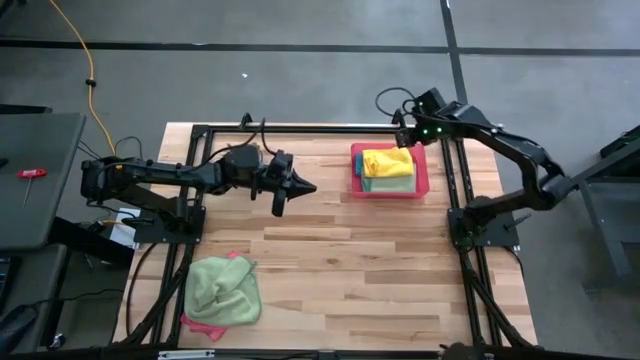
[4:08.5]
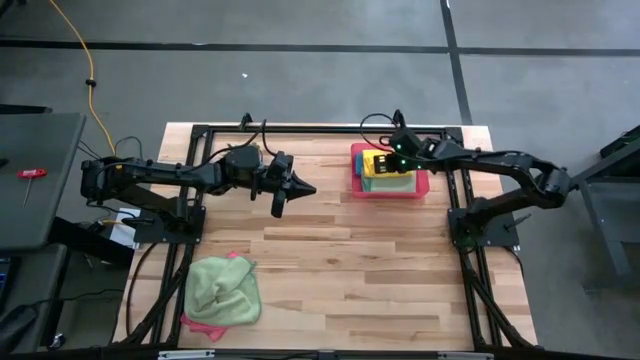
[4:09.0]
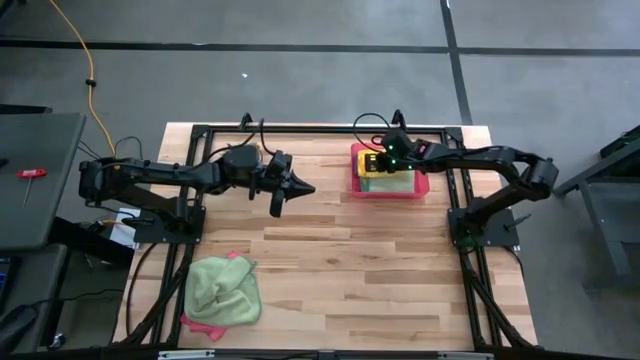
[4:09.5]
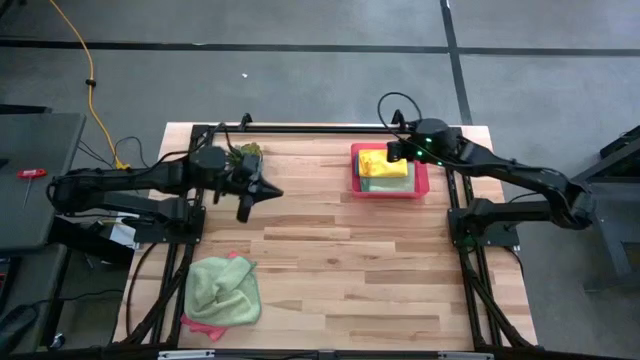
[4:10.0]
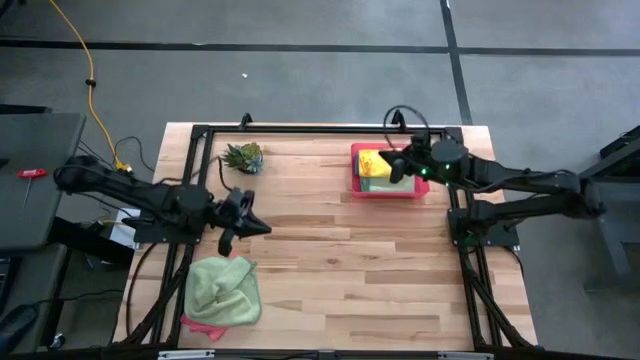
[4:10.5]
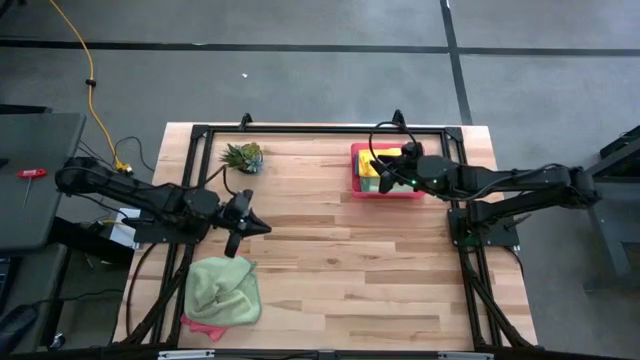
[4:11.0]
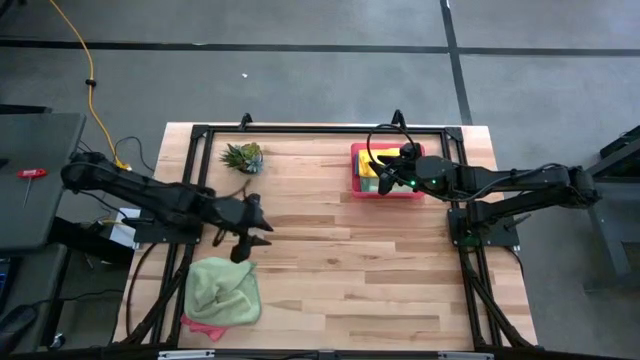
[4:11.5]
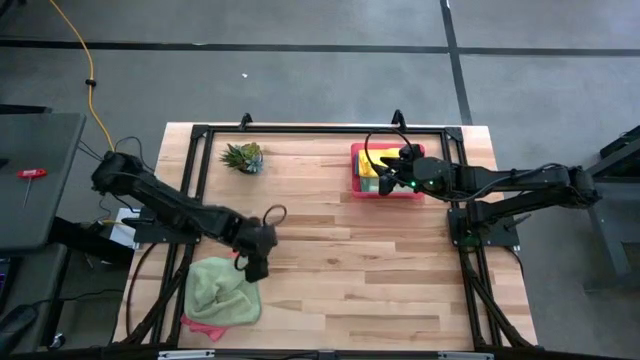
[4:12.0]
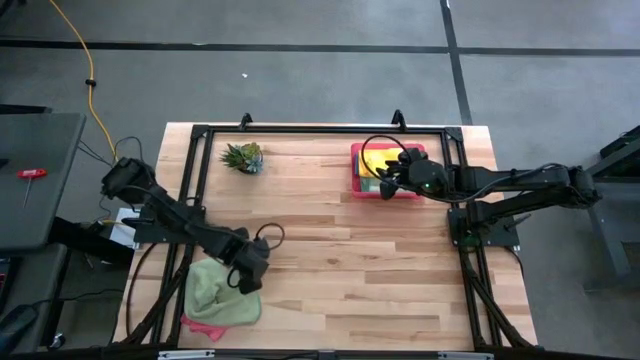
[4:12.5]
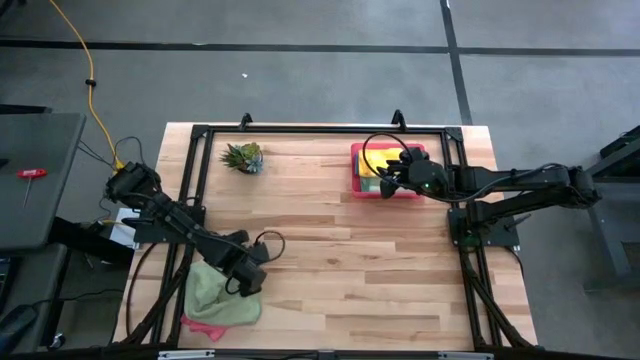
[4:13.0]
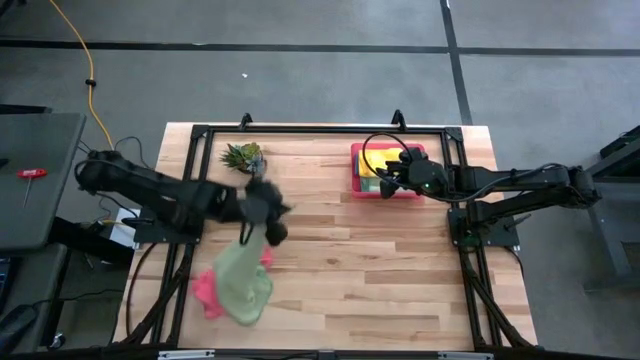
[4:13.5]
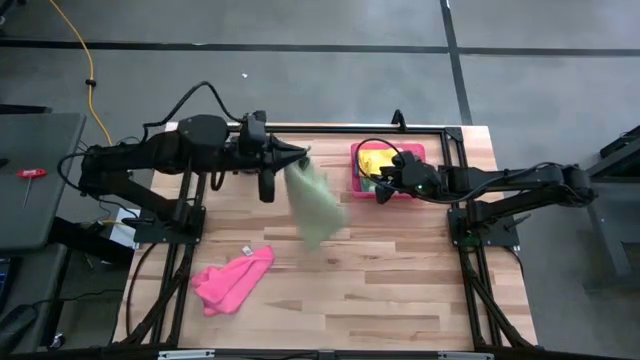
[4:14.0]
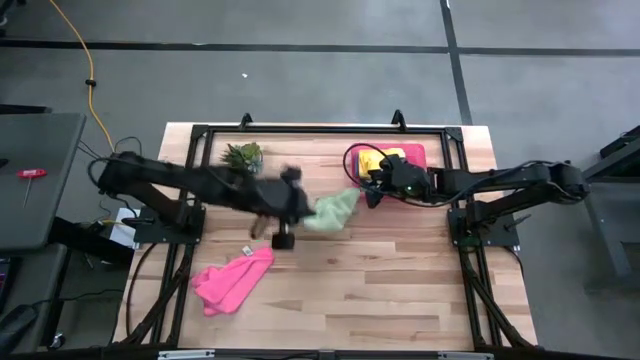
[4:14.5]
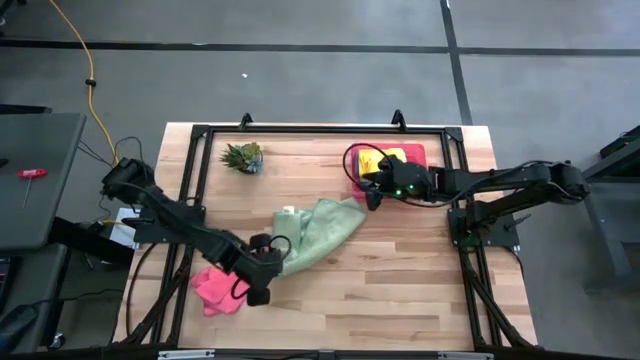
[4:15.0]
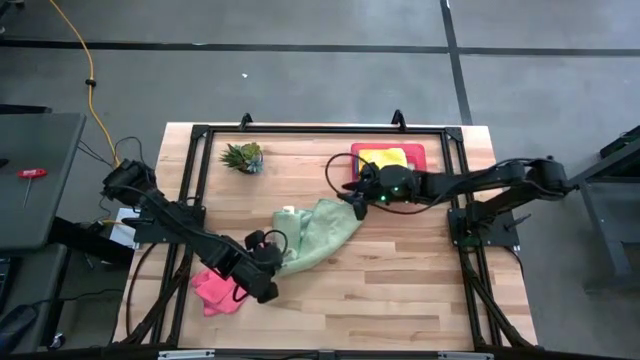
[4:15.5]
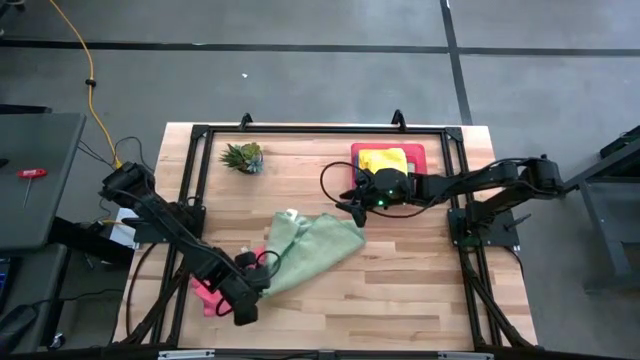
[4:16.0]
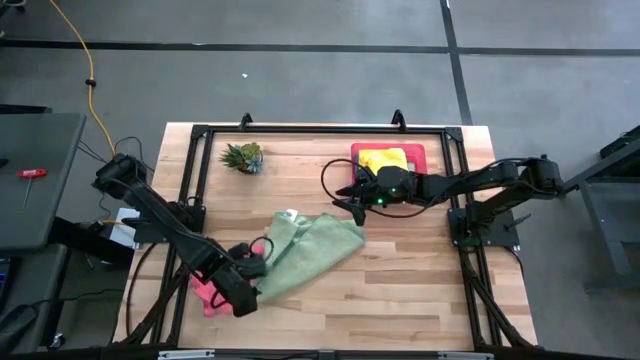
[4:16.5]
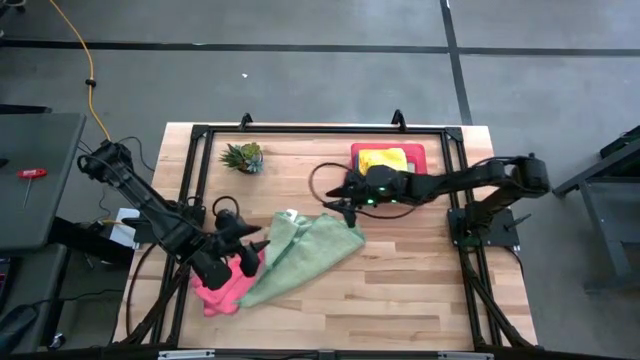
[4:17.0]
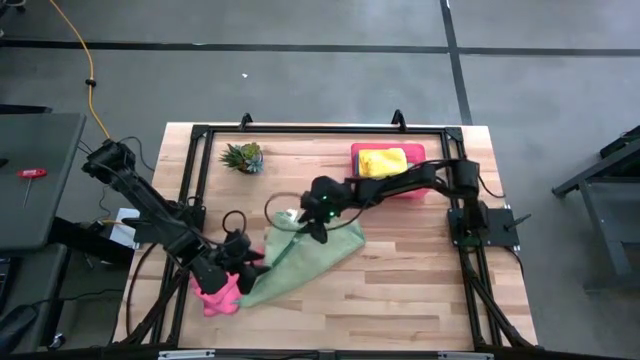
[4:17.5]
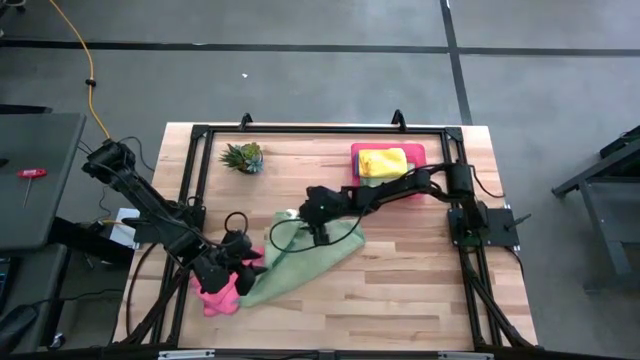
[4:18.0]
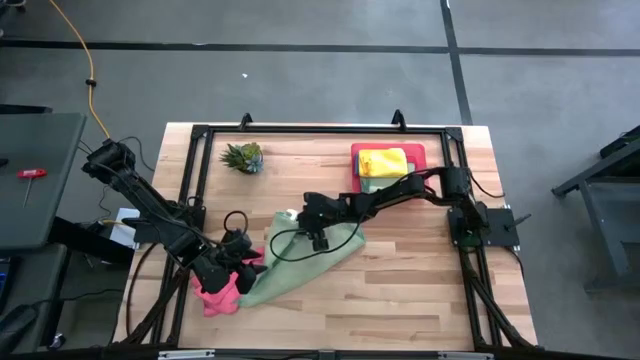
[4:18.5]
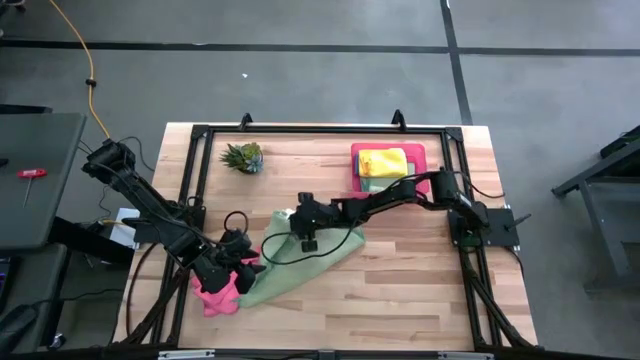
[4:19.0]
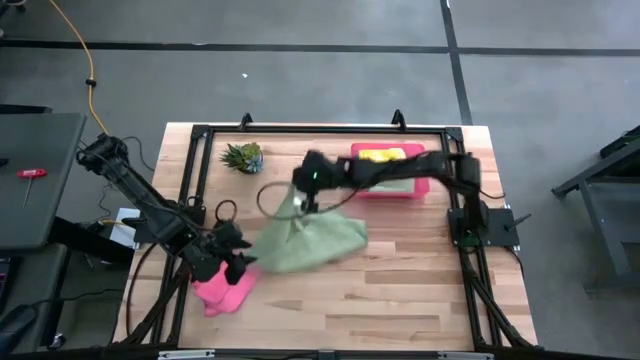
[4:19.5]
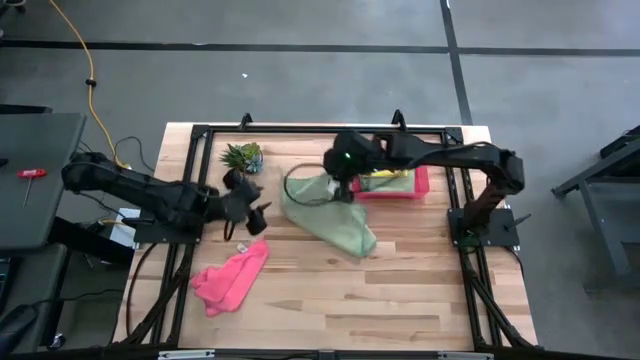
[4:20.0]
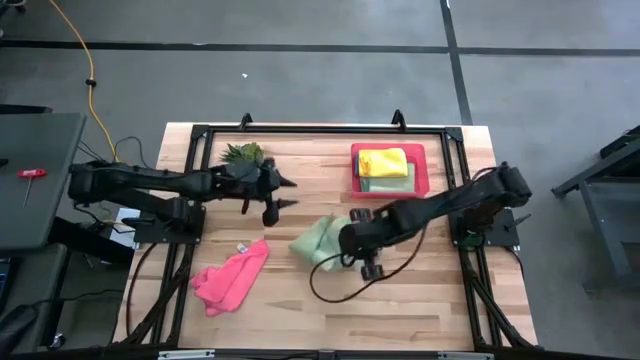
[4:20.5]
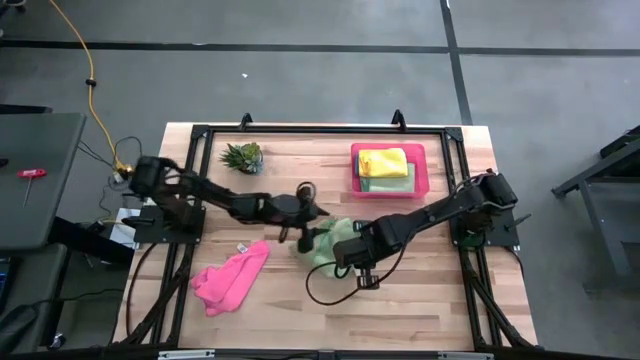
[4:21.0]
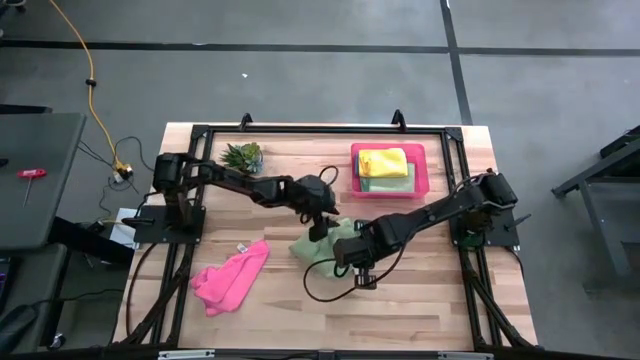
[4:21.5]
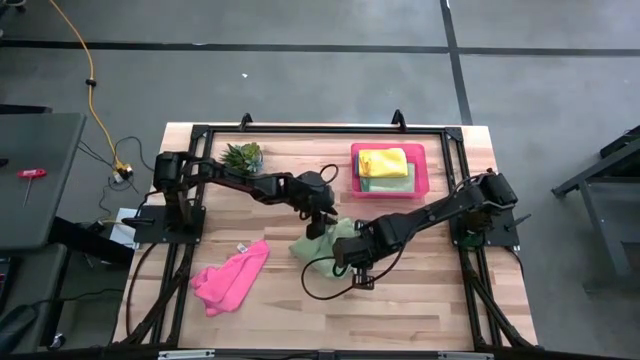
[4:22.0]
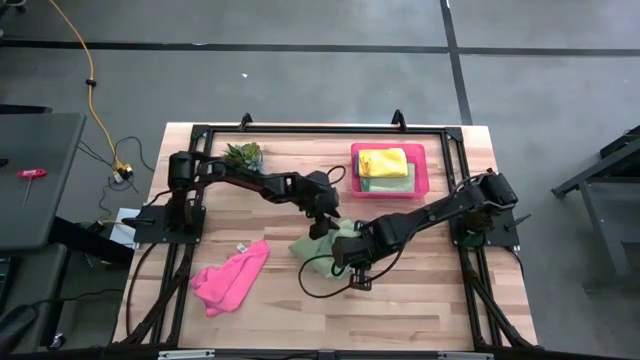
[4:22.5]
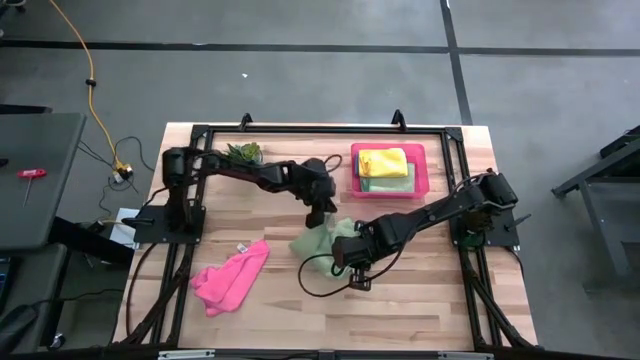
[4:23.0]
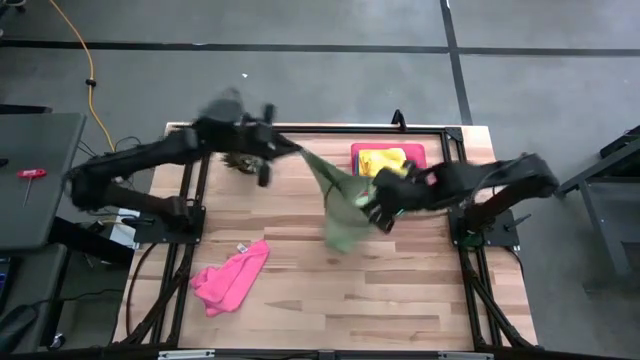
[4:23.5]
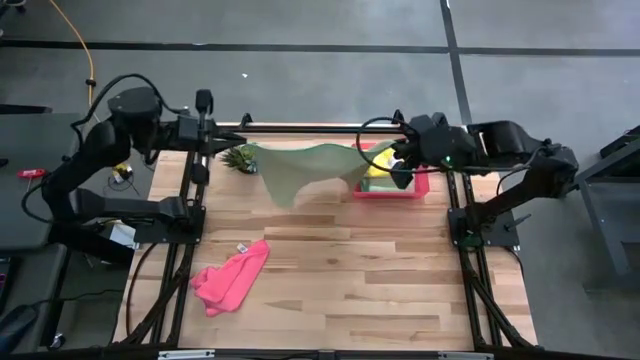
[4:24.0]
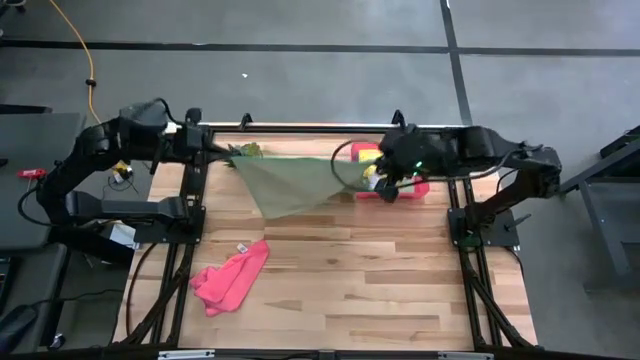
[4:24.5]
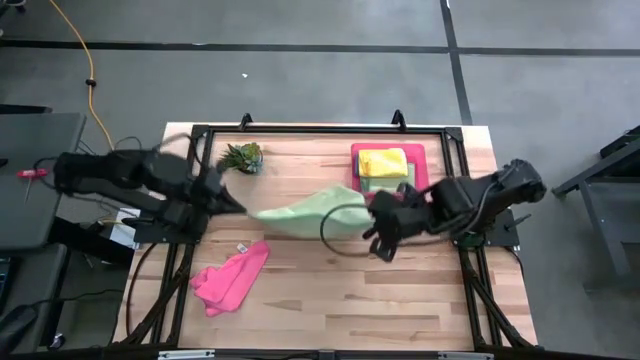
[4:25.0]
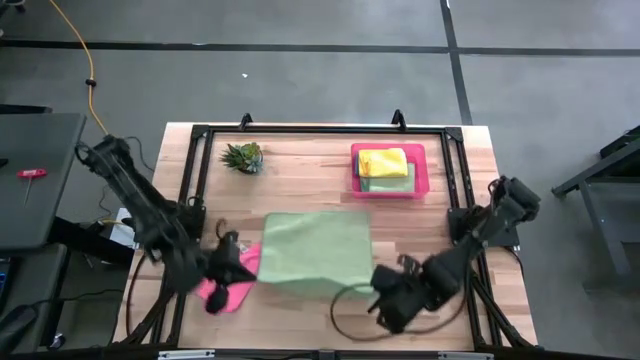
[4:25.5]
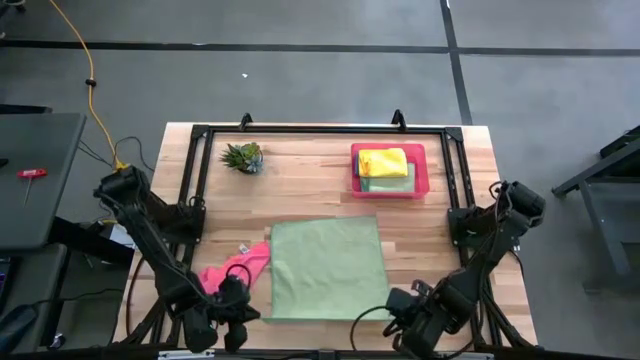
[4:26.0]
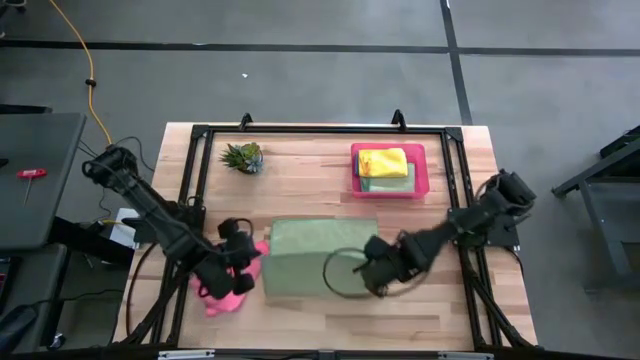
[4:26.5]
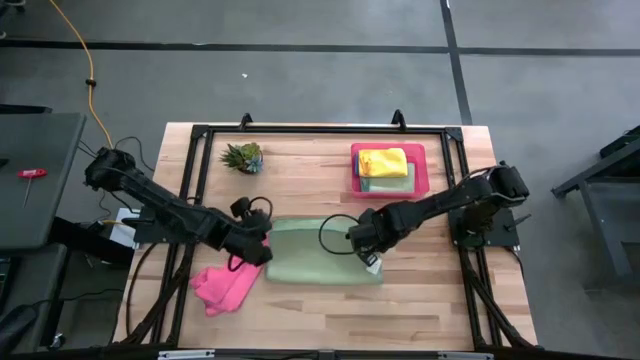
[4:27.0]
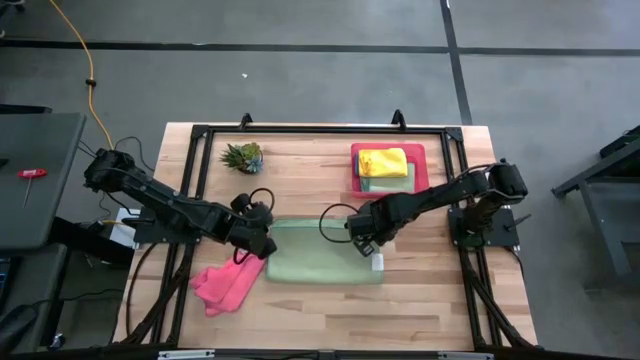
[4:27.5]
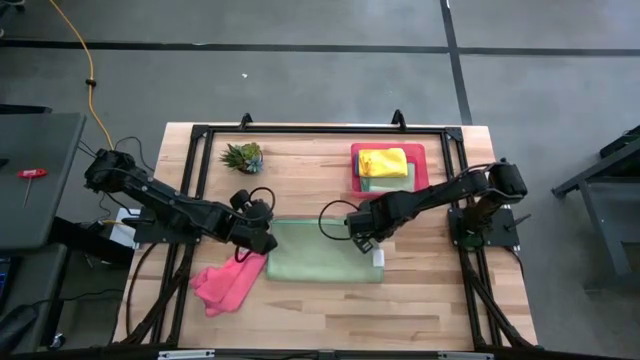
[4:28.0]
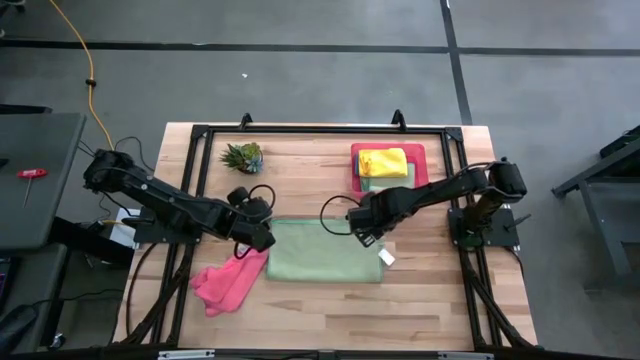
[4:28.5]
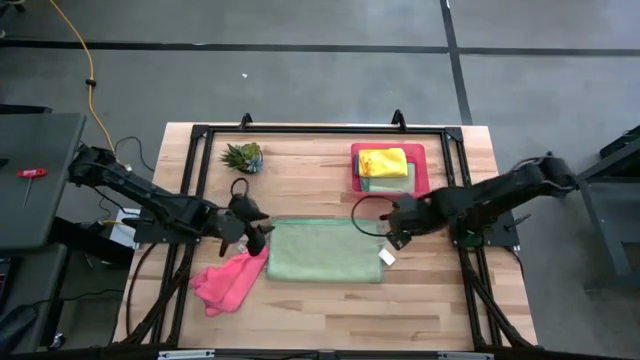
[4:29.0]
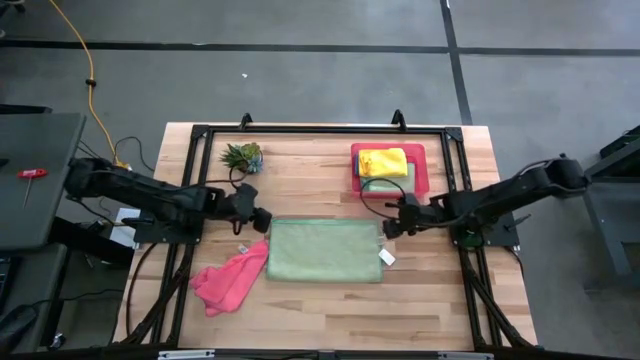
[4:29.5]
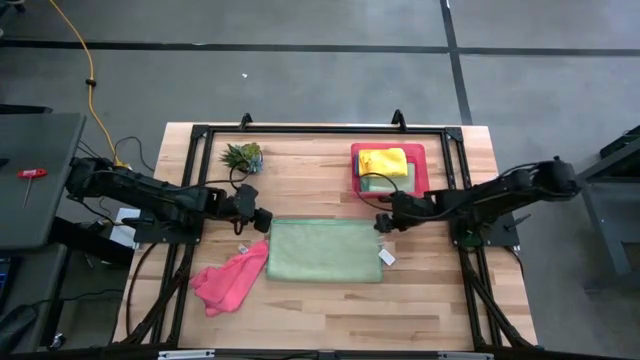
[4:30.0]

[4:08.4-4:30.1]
Task: Fold microfiber towels
Fold the green microfiber cloth
